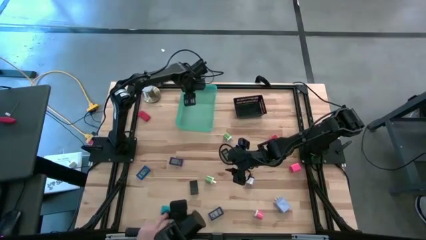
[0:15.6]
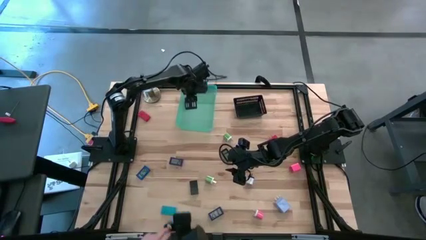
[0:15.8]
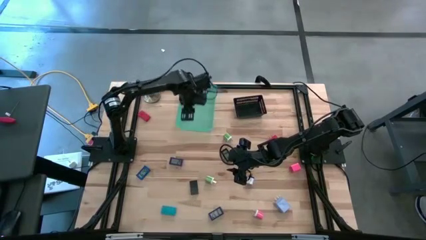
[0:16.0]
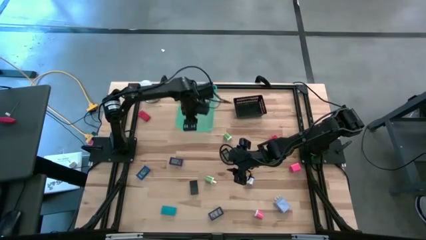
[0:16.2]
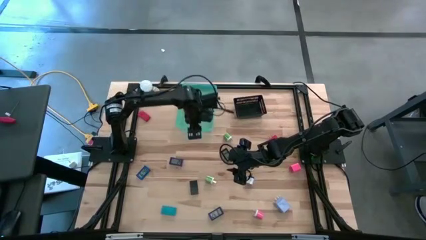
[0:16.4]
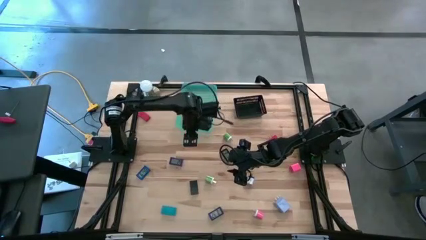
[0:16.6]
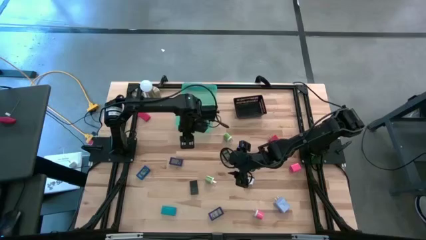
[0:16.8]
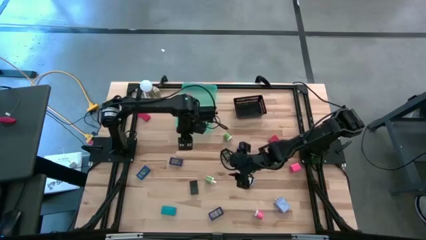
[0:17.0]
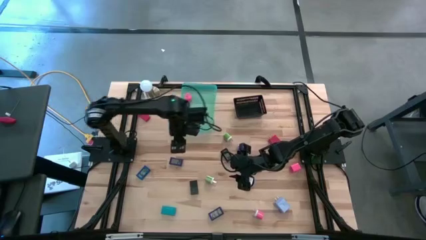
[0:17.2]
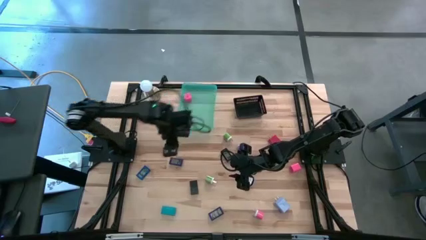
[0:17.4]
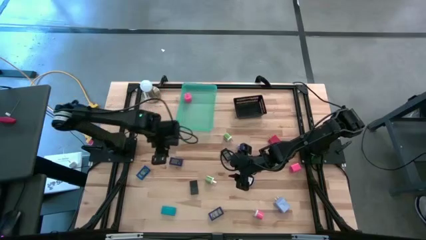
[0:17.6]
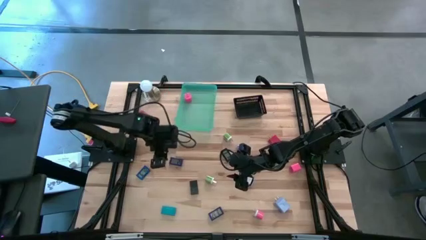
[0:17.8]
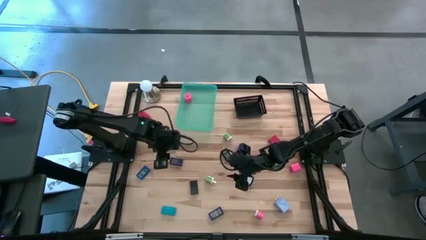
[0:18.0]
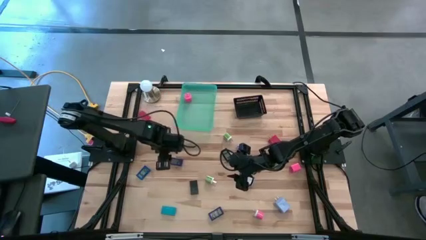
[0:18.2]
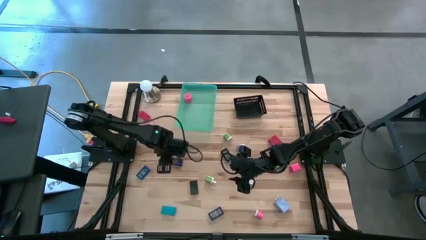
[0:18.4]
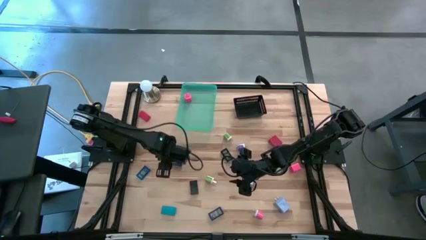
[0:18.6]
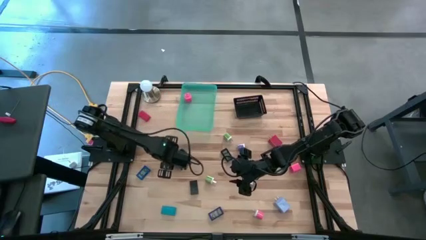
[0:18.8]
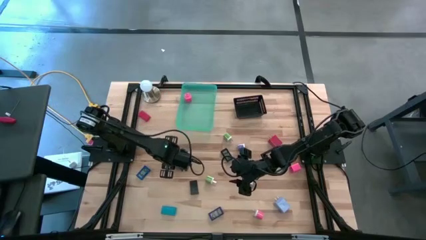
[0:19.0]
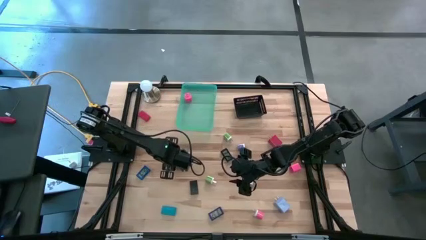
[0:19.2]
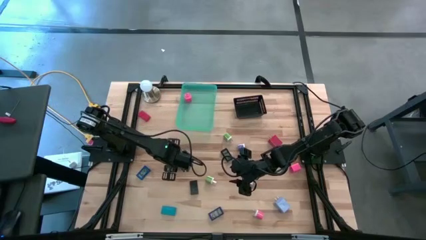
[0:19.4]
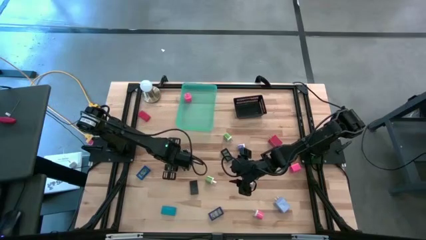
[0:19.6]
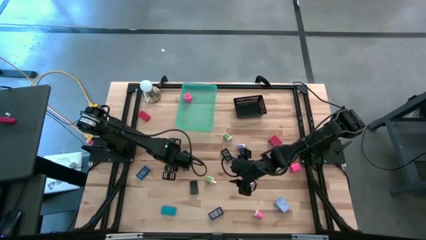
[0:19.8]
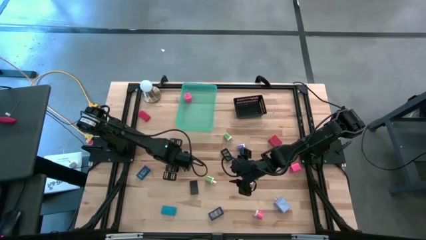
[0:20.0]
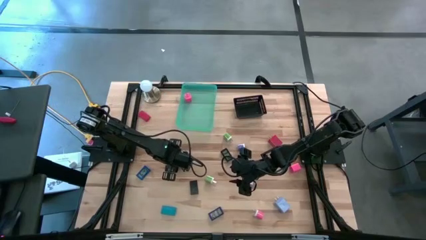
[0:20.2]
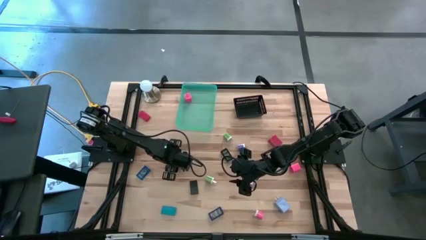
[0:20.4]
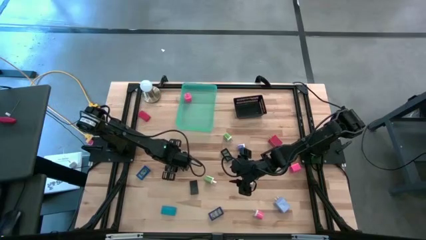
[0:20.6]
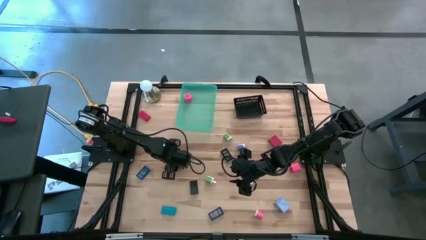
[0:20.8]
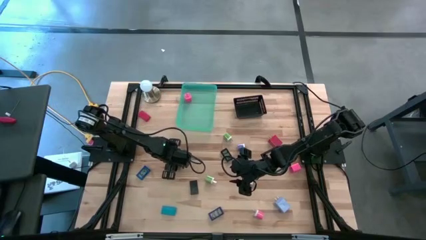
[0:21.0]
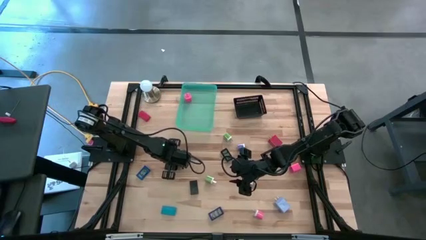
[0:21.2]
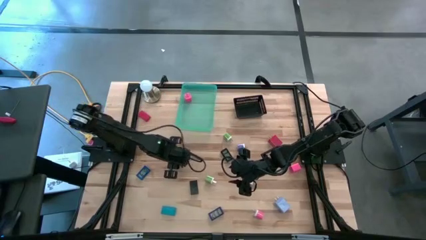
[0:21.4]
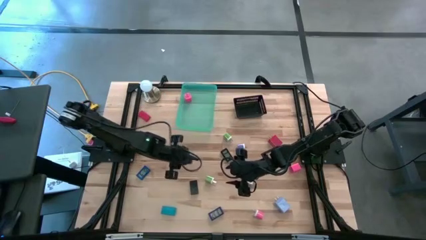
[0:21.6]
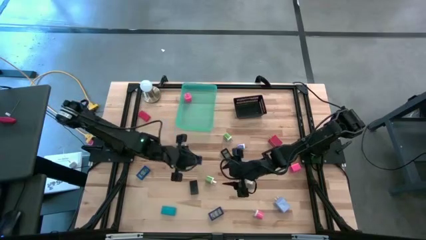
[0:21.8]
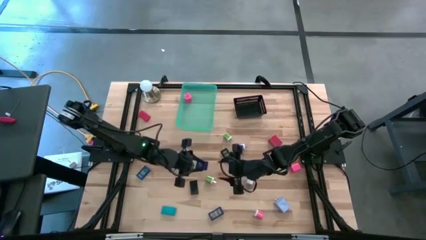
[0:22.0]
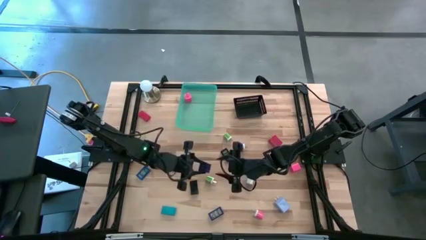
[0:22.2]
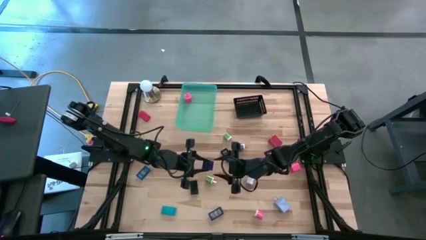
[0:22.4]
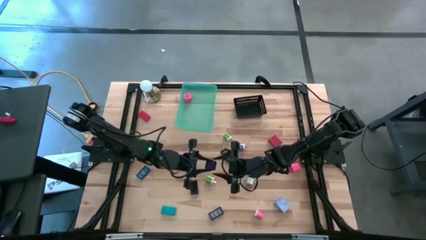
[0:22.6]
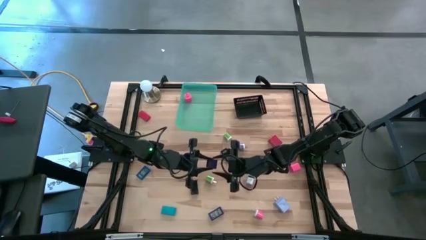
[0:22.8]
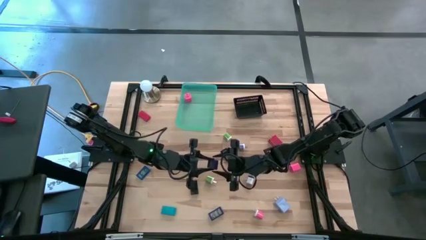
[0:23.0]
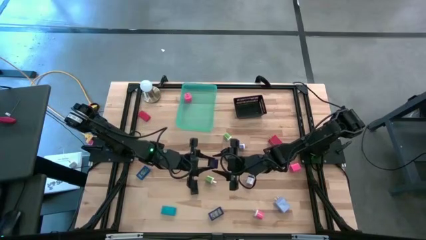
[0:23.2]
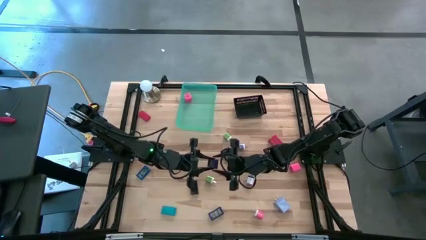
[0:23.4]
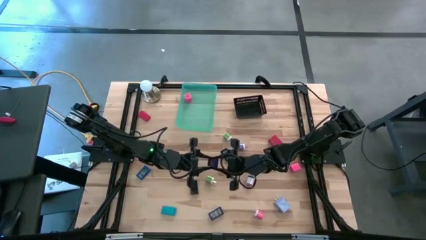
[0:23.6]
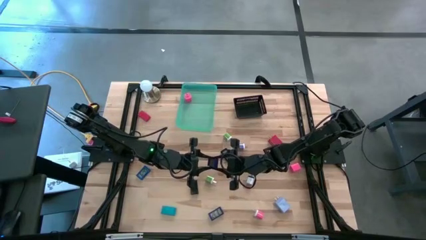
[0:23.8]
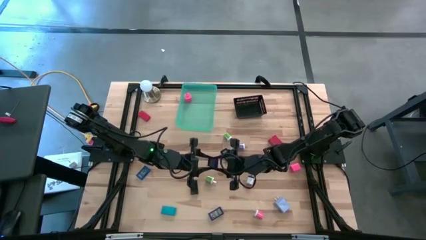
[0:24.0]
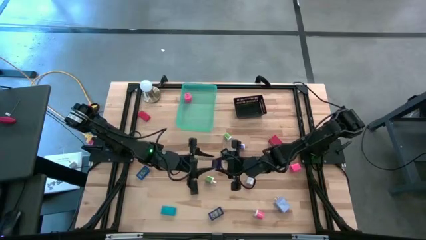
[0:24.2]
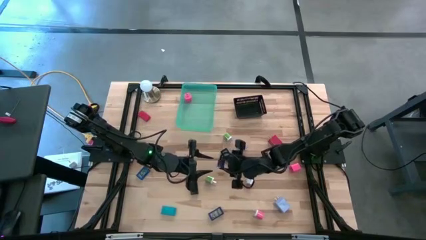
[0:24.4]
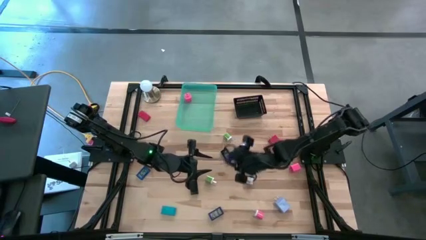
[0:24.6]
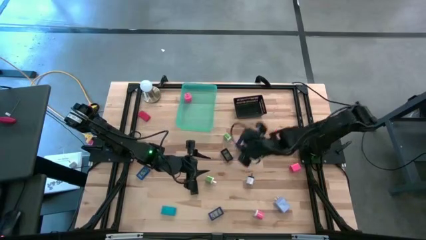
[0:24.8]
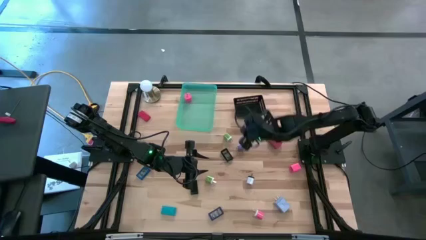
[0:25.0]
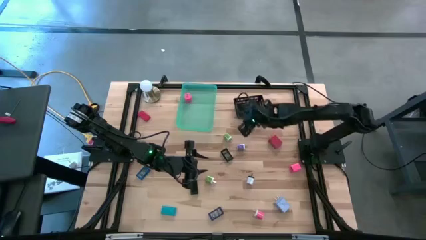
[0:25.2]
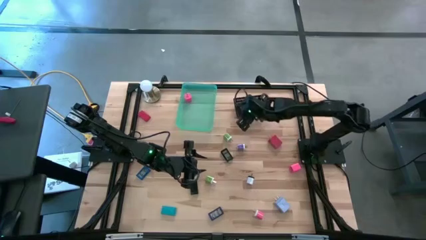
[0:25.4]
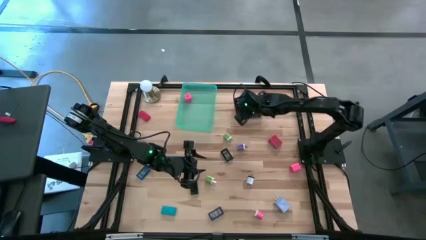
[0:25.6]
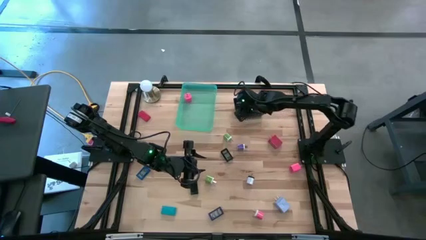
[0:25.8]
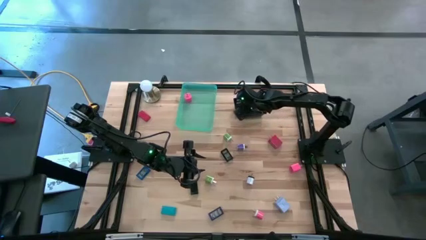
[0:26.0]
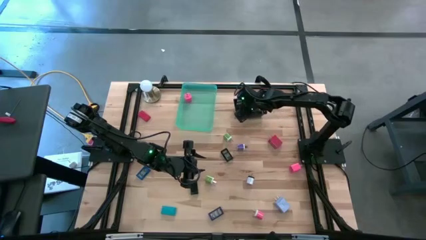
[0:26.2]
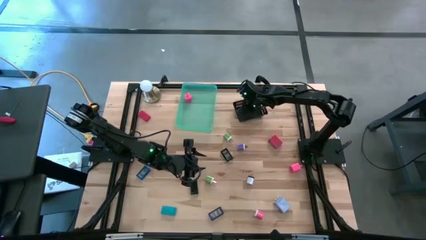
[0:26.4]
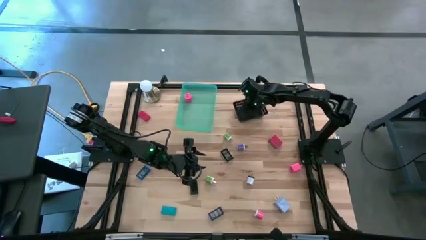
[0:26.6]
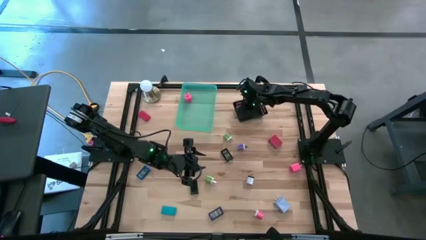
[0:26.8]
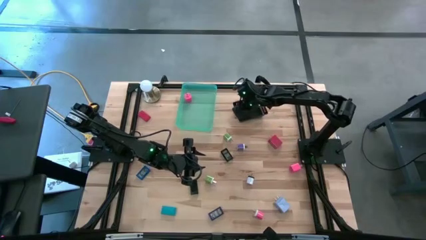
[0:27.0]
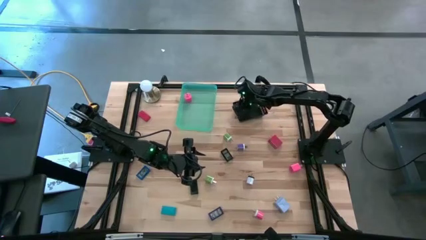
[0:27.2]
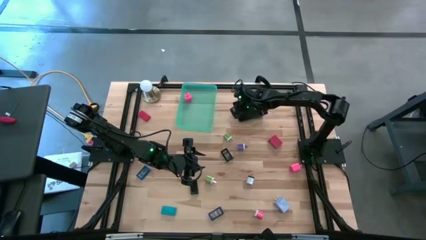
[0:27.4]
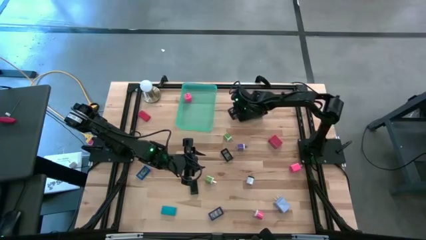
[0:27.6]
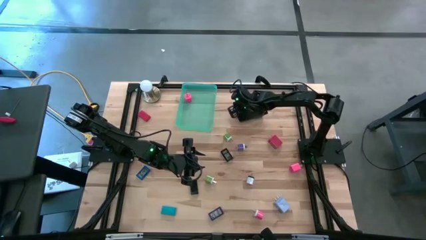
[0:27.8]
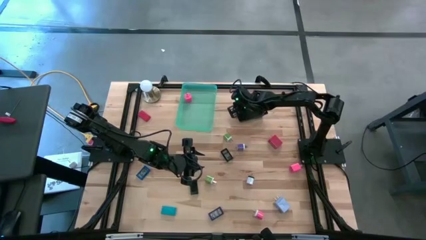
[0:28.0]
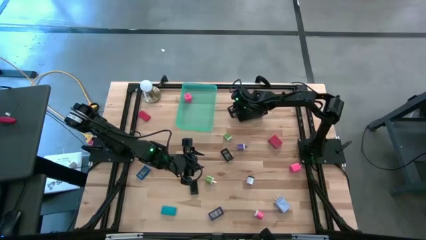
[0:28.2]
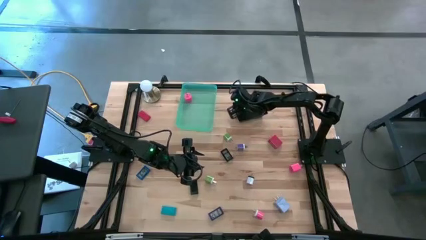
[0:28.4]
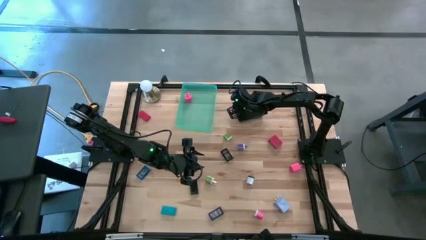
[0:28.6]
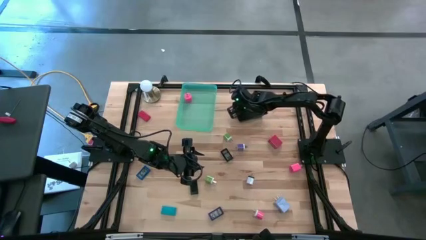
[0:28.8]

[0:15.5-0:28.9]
Task: Pick & Place Office items
Put the top dark blue digital clock into the black bin

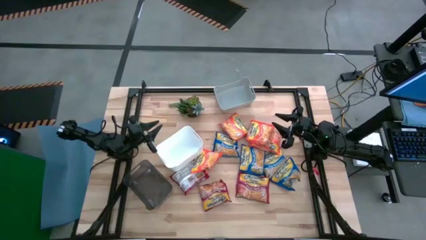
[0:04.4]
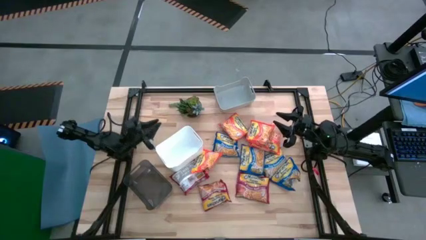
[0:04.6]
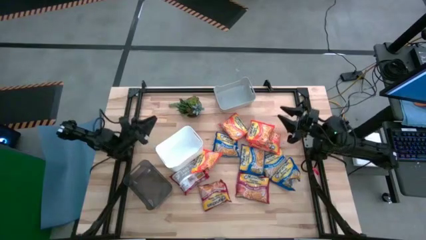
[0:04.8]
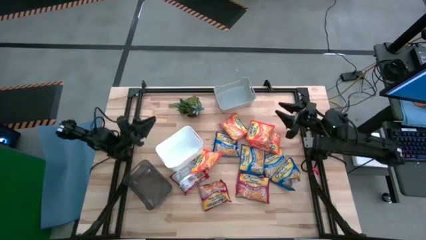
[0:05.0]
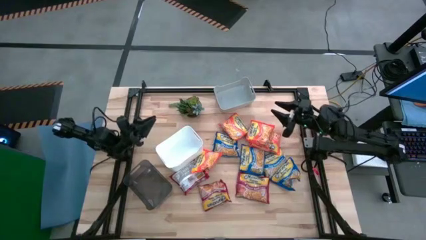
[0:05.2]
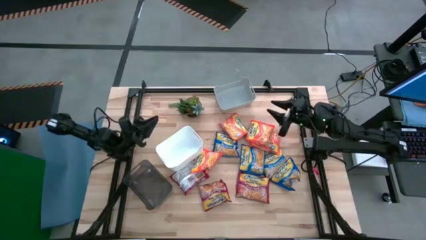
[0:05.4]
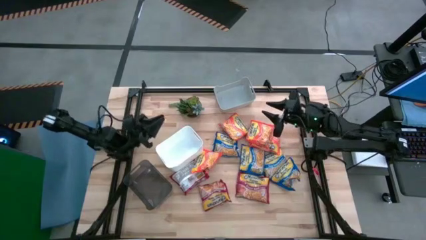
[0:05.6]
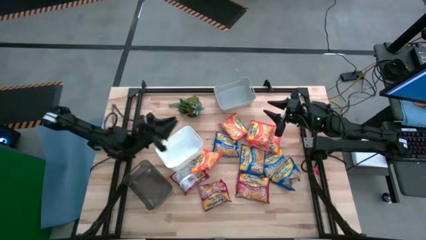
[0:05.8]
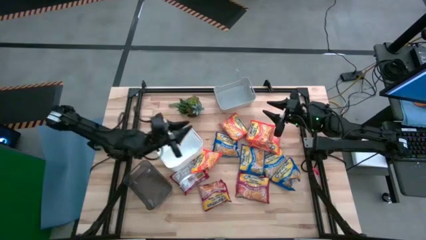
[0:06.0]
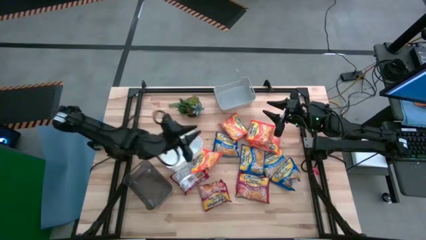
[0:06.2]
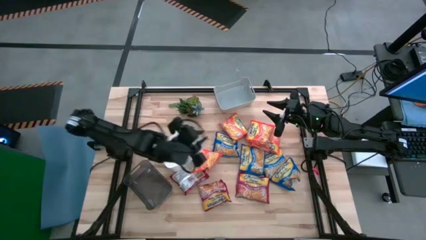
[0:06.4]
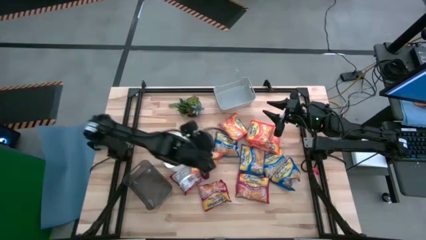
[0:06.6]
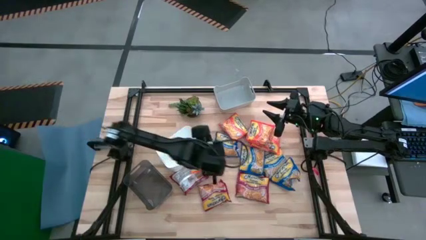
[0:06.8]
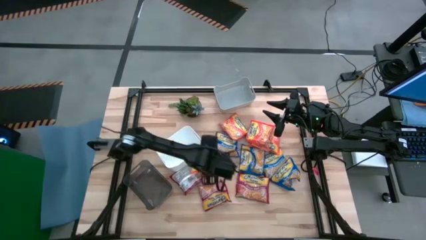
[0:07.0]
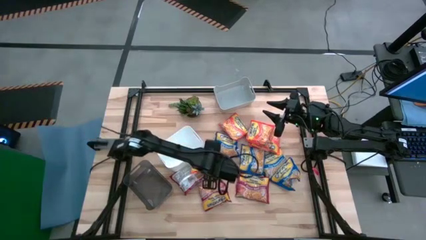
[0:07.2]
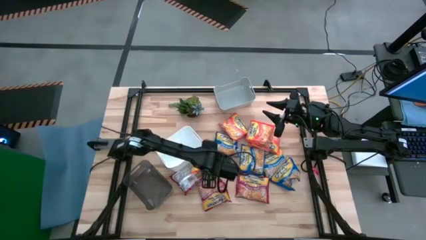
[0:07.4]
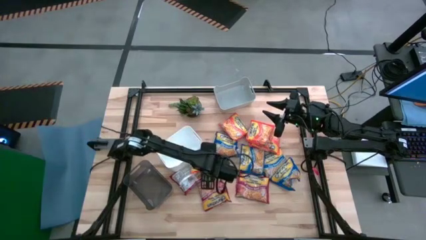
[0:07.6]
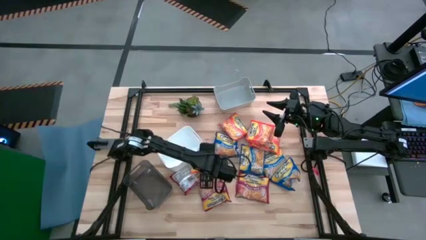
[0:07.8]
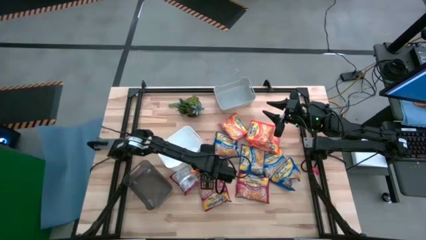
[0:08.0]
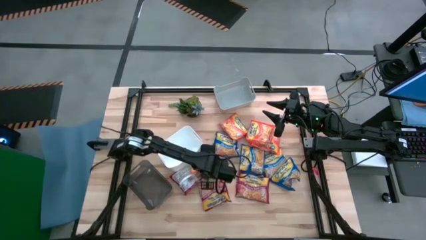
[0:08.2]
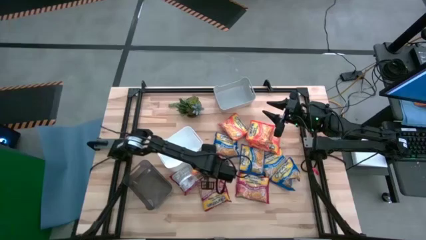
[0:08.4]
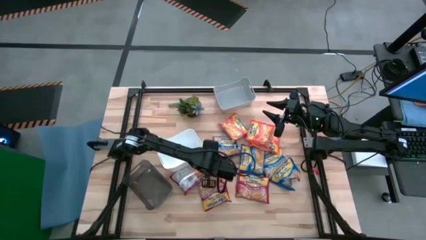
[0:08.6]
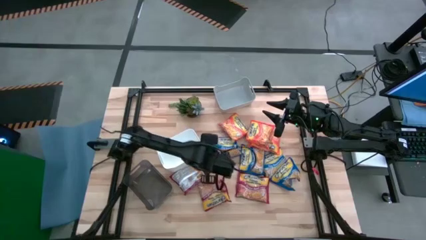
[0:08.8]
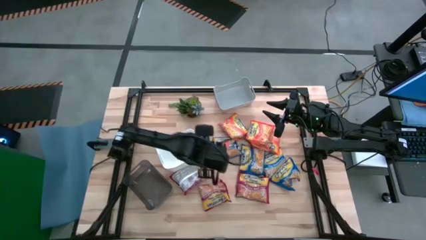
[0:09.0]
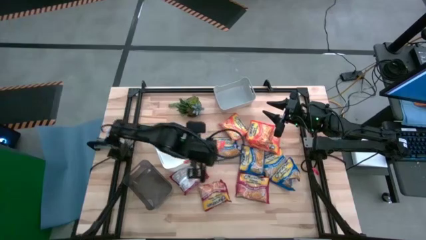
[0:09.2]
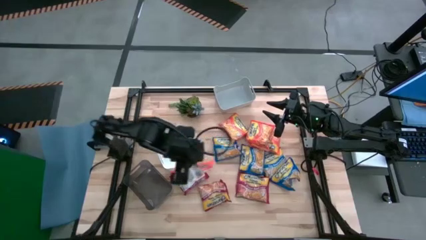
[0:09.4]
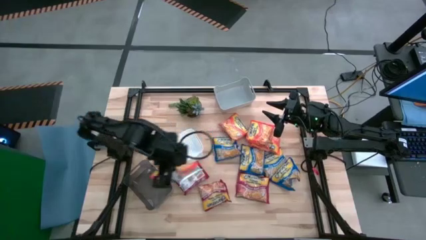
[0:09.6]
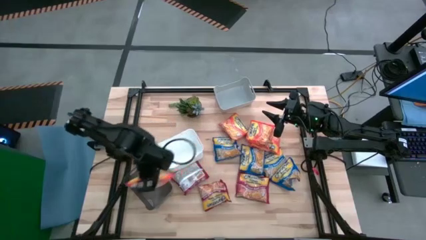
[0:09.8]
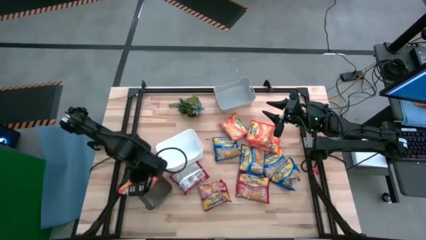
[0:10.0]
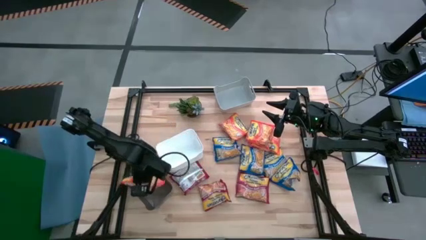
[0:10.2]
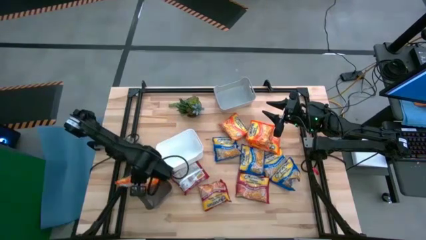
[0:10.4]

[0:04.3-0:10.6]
Task: Sort Maruchan noodles
Put the orange noodle pack into the black bin
